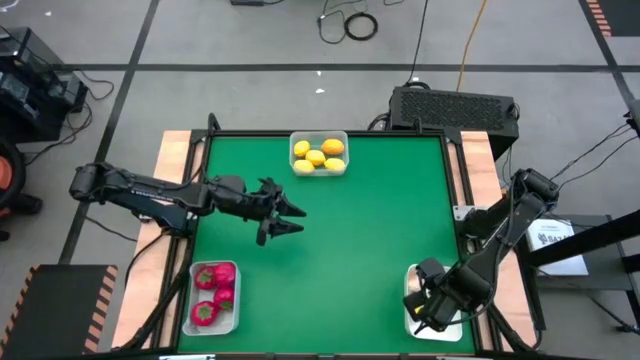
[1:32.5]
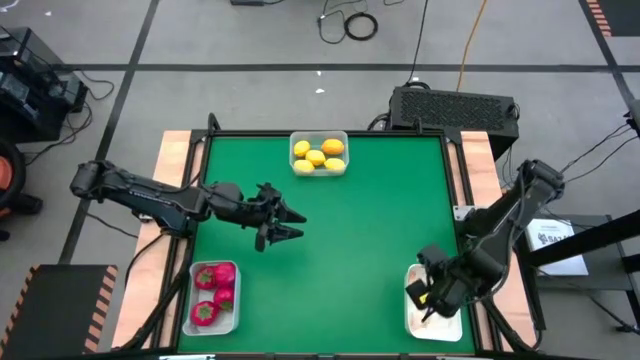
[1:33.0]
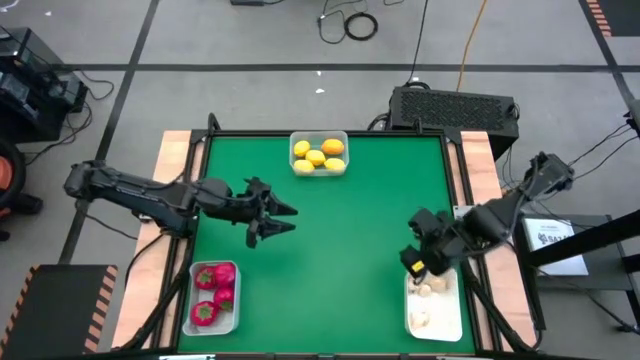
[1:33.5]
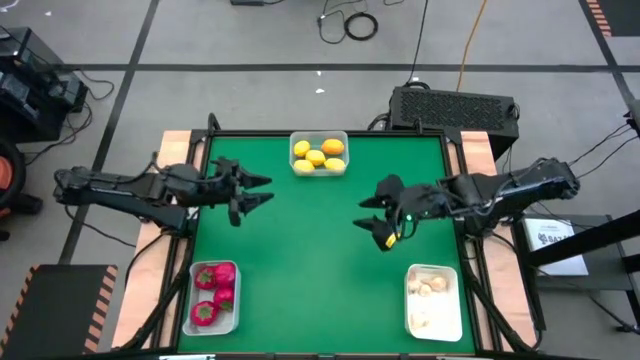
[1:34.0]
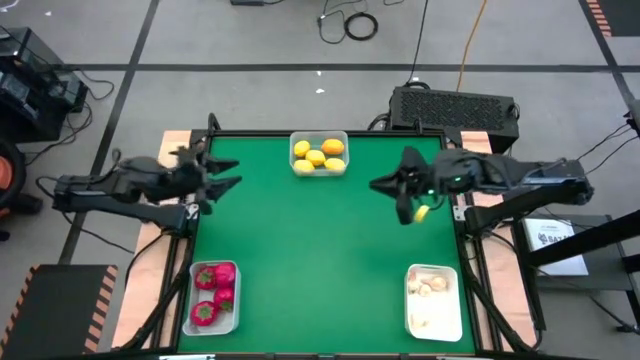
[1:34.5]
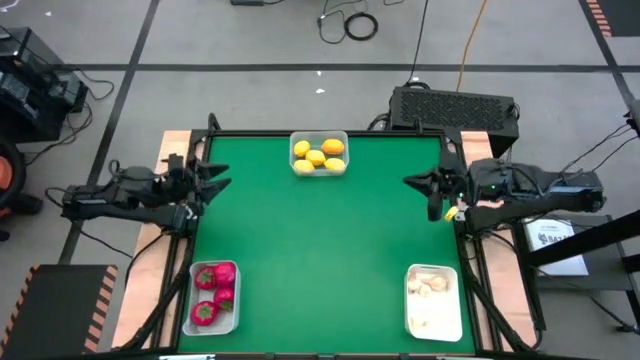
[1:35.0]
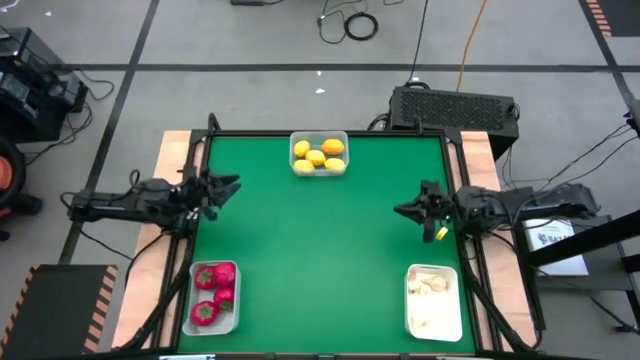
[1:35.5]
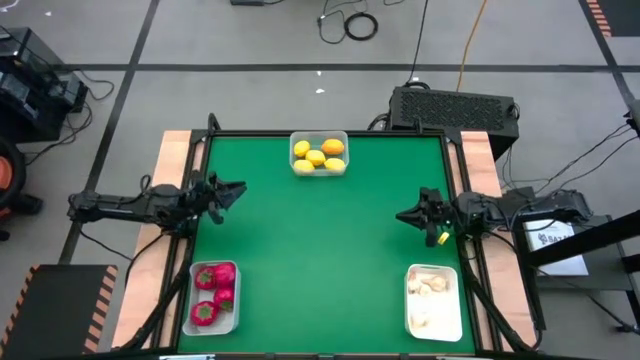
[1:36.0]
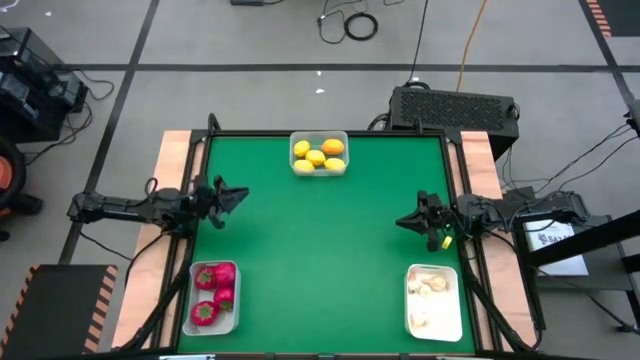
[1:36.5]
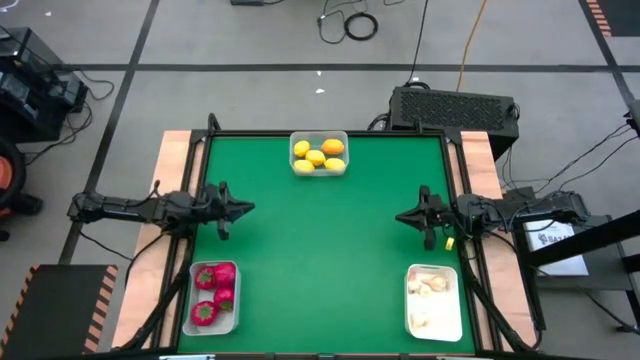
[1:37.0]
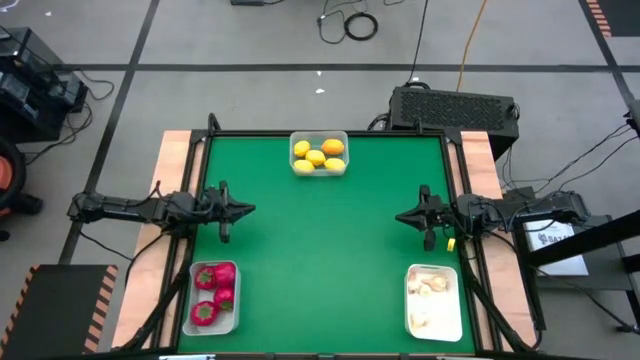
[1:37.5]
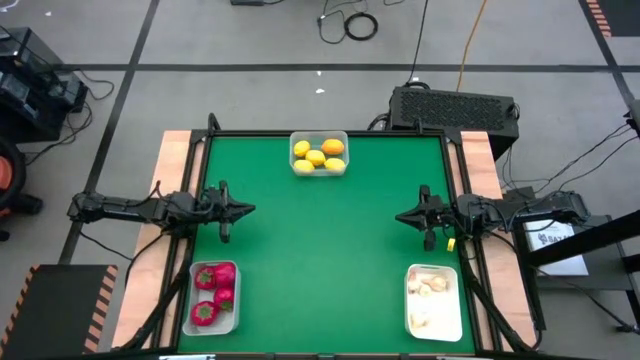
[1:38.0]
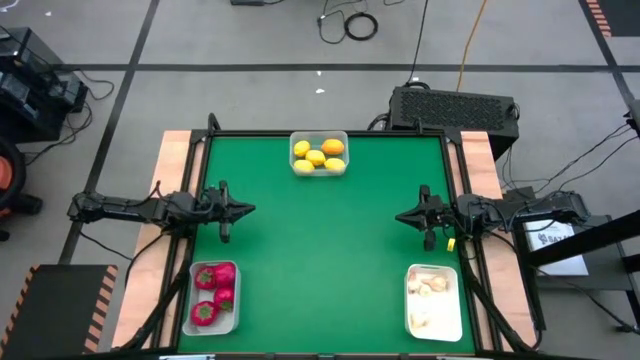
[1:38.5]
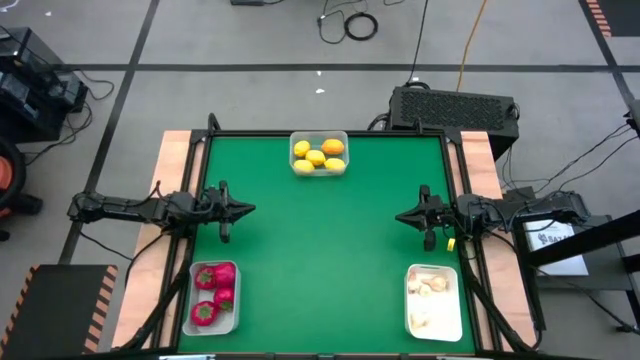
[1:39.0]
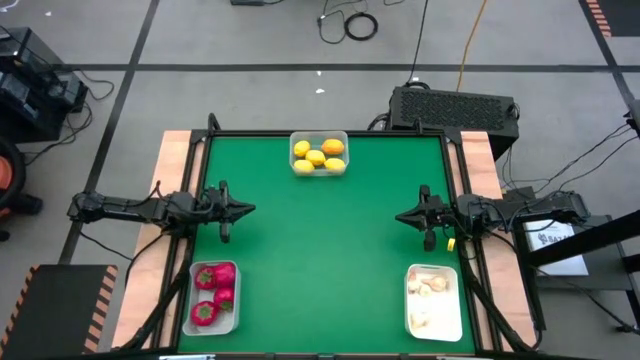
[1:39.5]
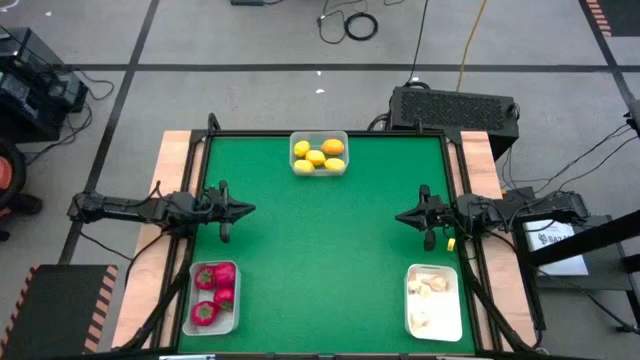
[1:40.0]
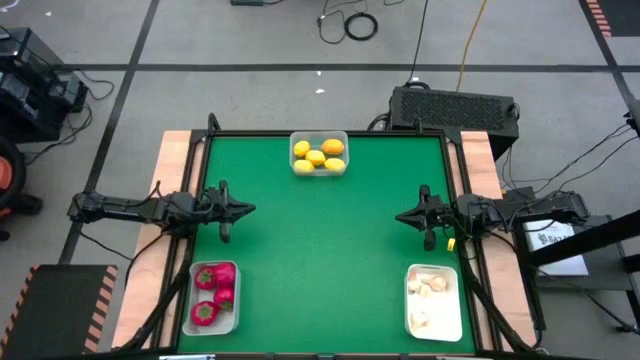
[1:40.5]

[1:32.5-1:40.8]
Task: Sort produce into baskets
Return to Home Position
